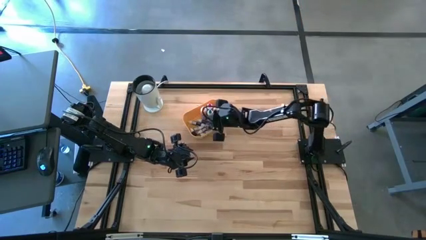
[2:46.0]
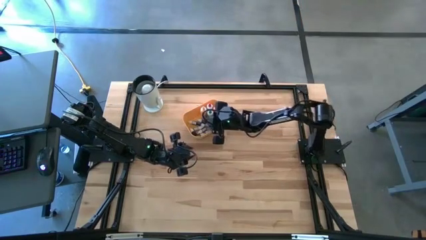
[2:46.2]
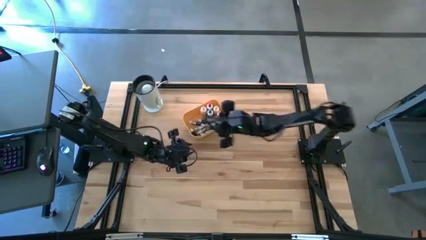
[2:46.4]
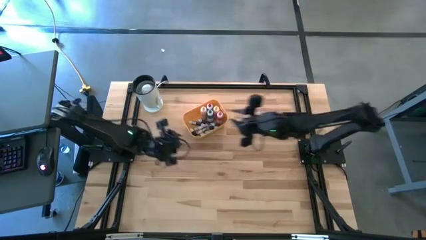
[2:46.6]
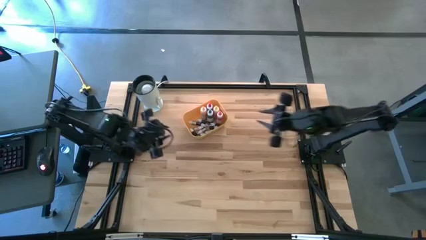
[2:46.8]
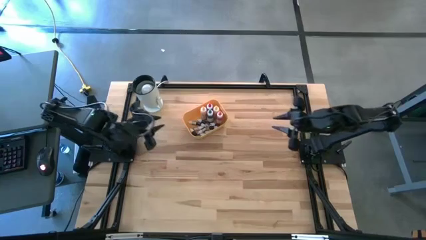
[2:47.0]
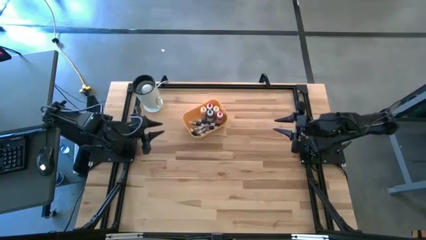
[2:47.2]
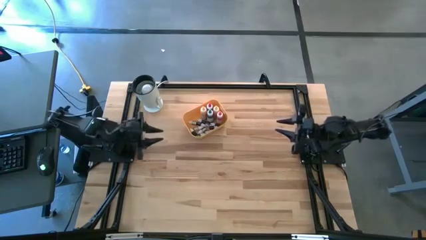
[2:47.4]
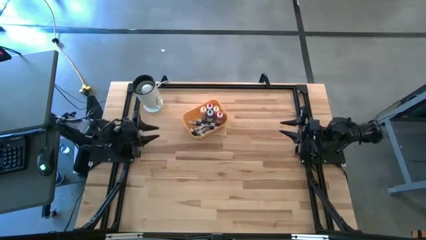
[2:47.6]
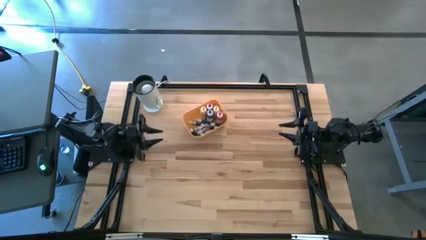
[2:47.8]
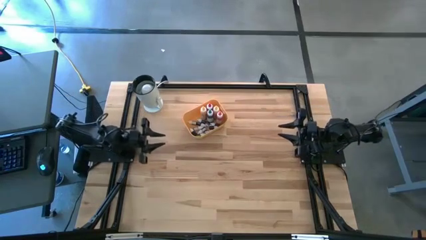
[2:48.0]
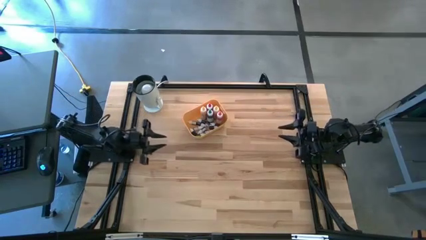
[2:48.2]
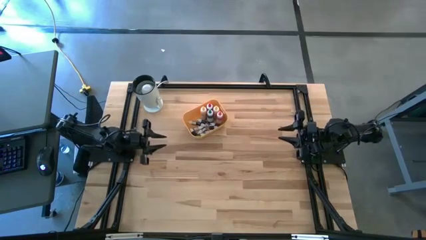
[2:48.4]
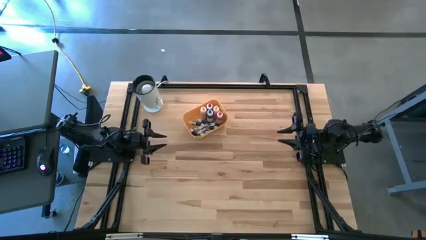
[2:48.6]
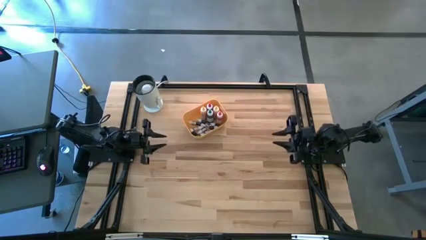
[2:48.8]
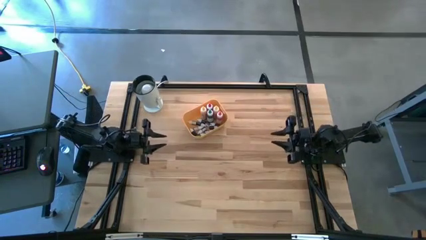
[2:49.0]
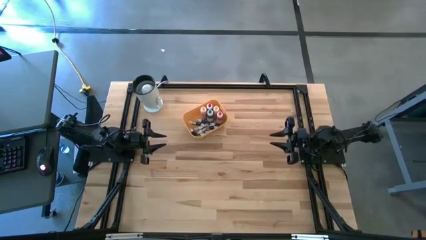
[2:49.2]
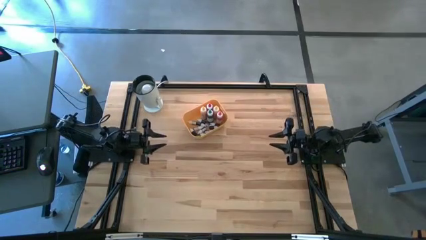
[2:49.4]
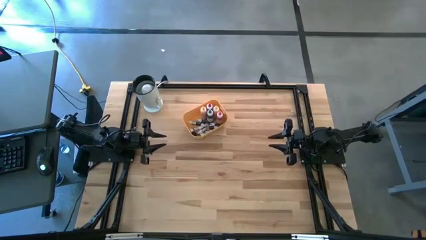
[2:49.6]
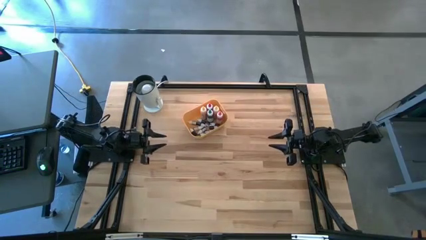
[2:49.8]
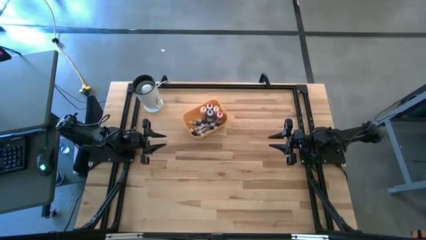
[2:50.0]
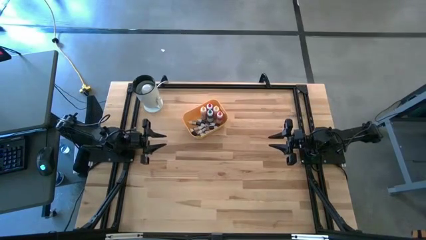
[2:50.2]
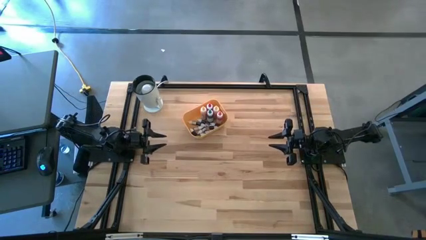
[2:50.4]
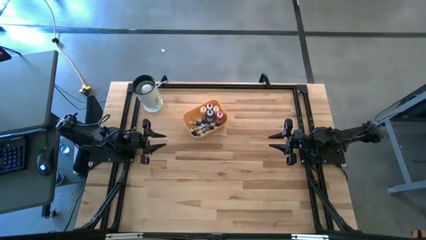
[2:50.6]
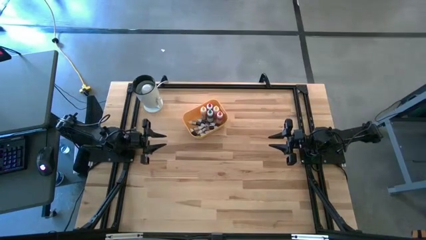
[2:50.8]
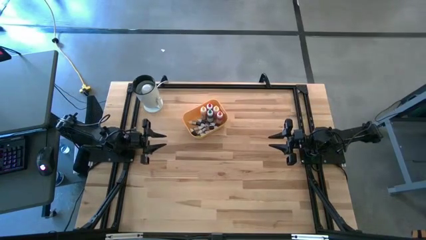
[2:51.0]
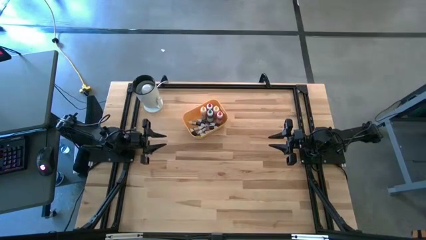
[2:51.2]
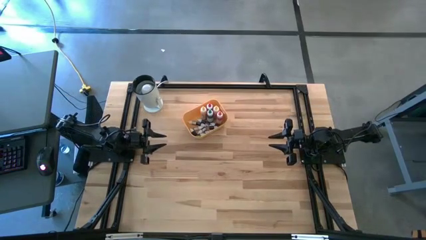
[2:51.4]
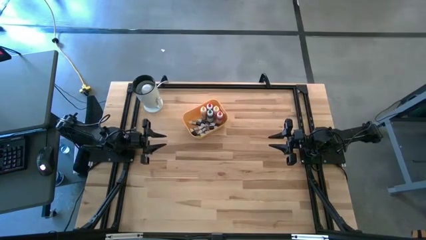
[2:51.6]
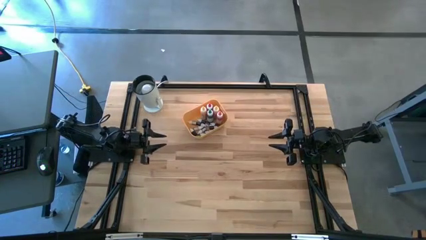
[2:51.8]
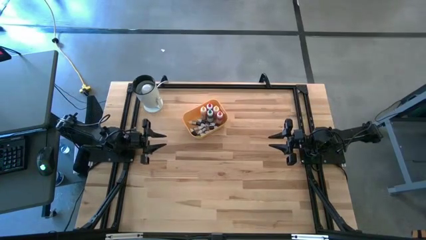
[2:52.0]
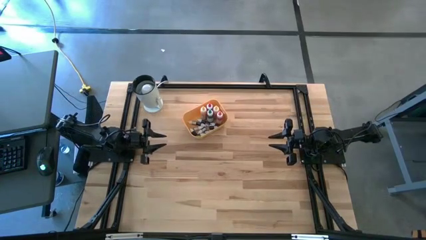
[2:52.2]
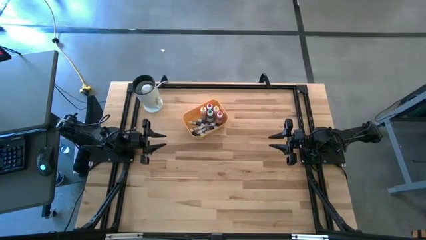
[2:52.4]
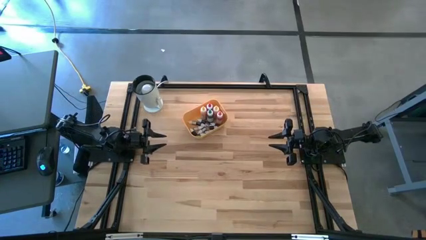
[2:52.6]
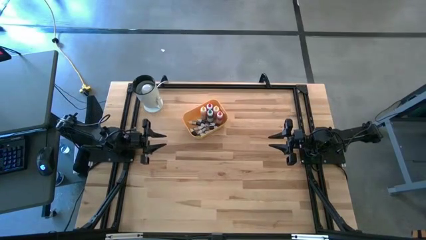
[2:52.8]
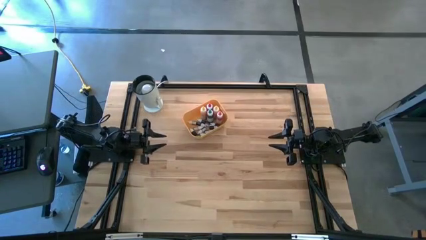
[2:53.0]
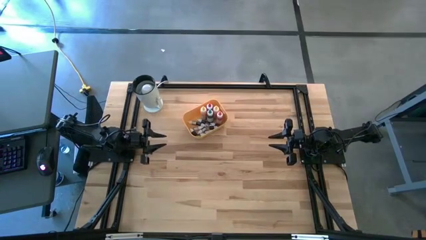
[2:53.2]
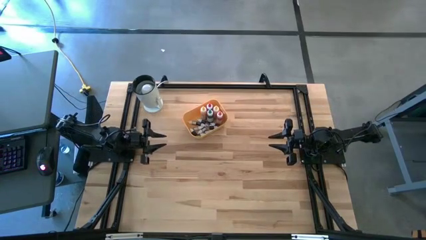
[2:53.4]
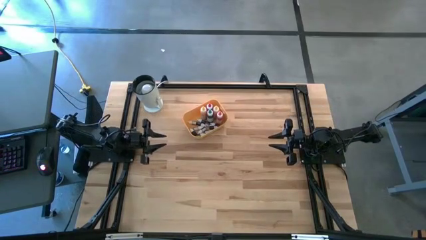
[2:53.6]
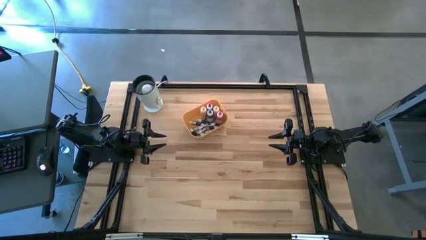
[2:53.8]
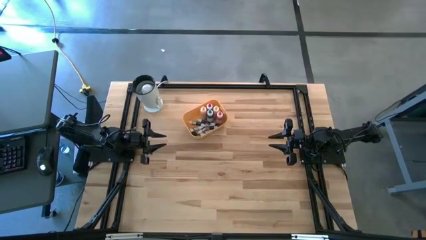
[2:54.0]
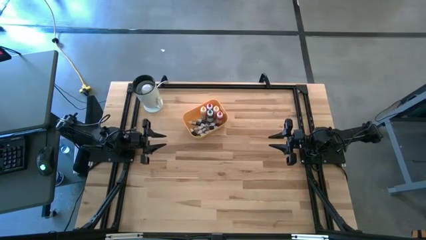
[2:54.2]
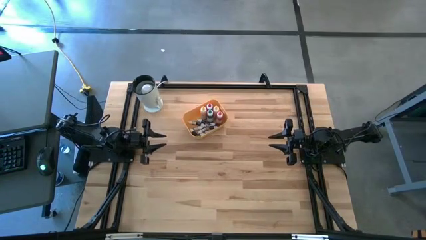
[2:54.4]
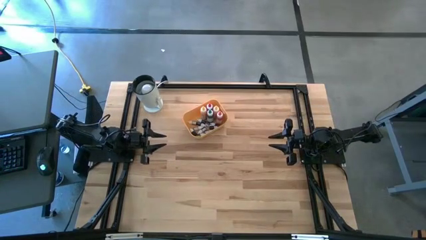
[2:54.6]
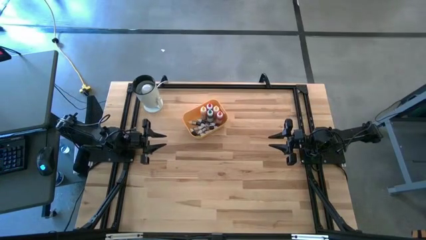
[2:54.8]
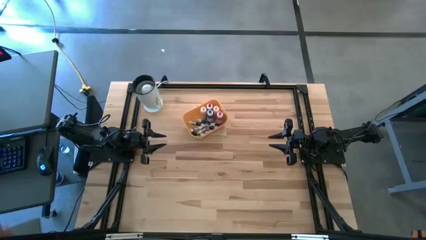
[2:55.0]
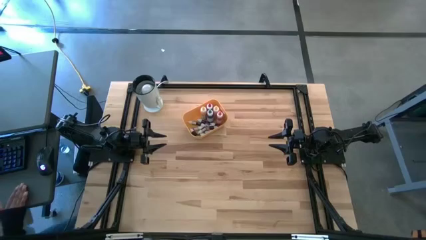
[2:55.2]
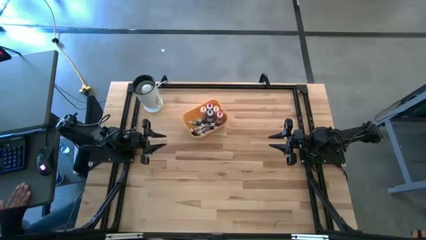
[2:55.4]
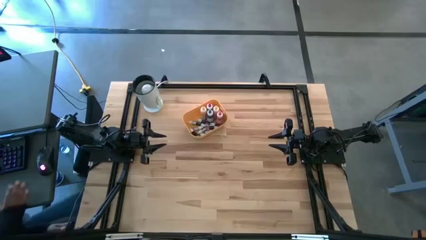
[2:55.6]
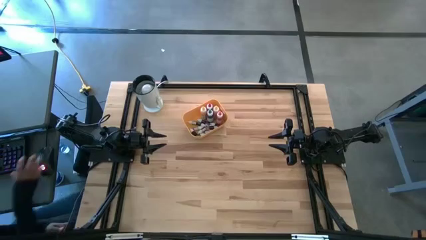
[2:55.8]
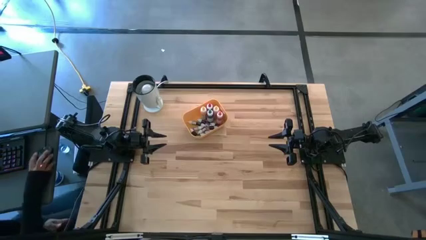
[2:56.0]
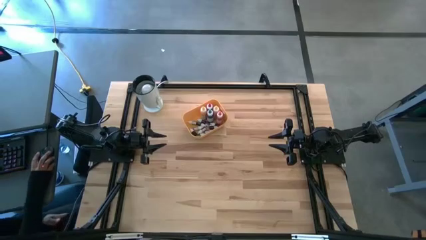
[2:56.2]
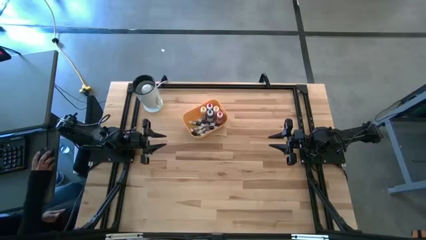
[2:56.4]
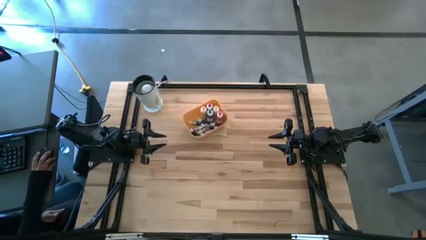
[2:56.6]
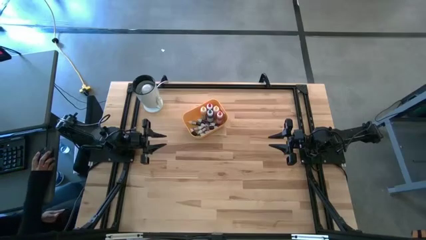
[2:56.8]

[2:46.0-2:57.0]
Task: Pick & Place food coloring
Return to Home Position

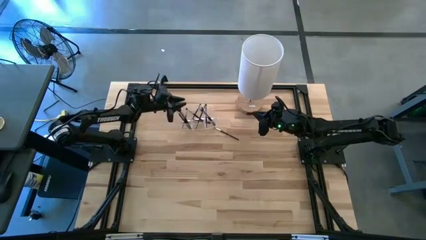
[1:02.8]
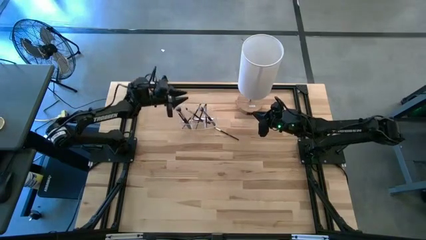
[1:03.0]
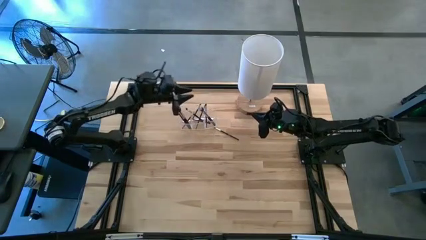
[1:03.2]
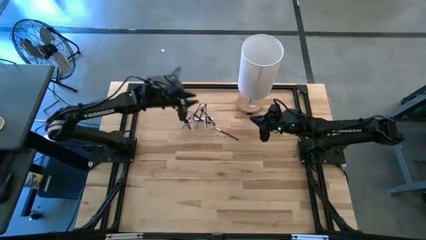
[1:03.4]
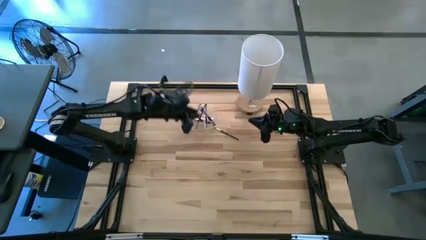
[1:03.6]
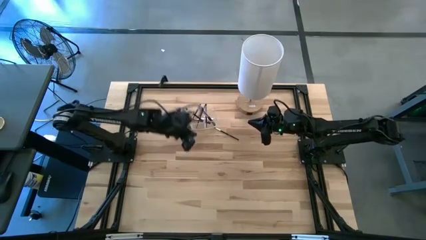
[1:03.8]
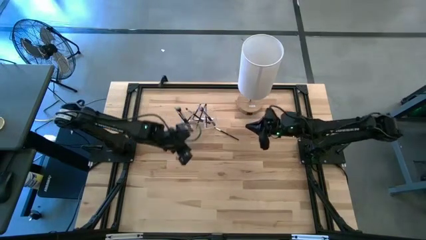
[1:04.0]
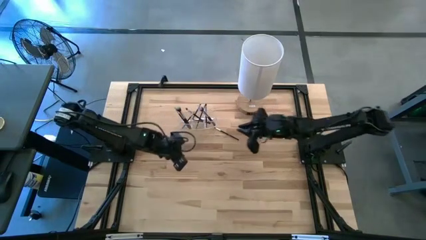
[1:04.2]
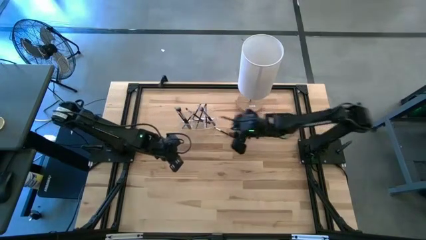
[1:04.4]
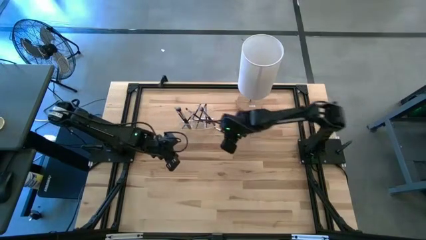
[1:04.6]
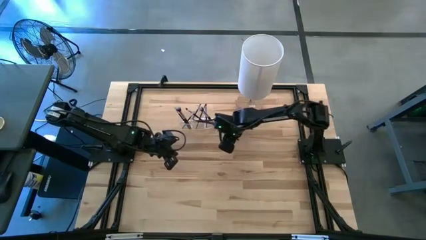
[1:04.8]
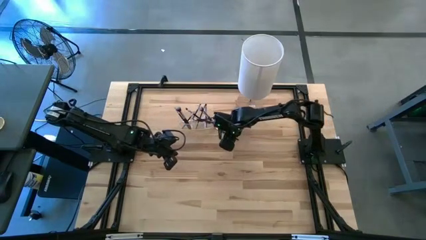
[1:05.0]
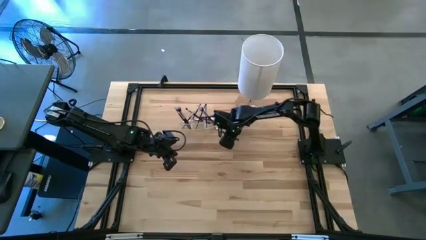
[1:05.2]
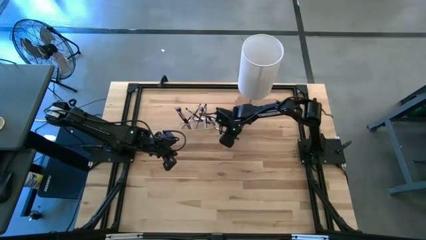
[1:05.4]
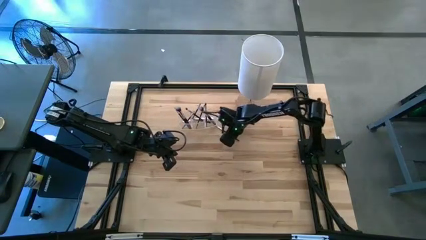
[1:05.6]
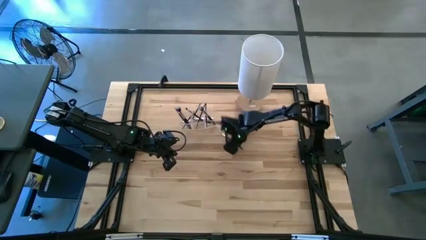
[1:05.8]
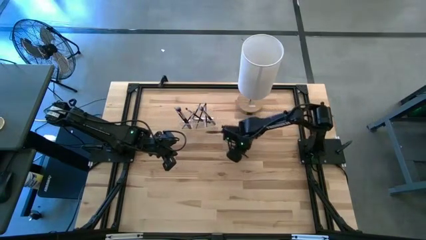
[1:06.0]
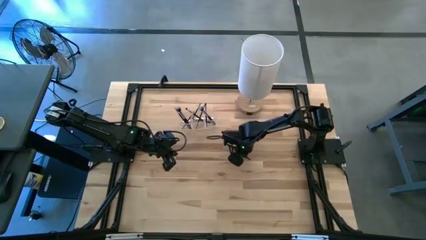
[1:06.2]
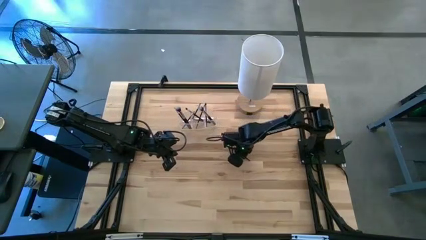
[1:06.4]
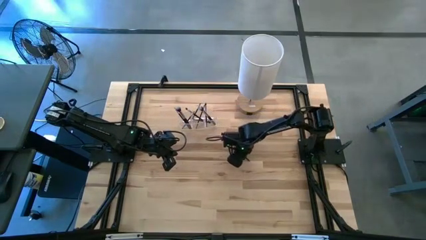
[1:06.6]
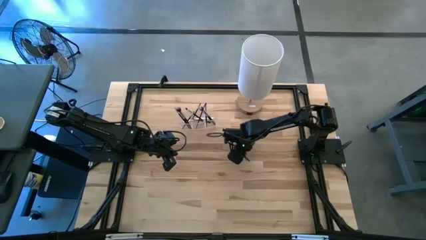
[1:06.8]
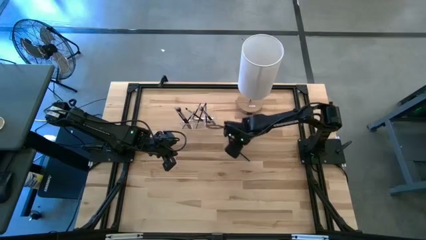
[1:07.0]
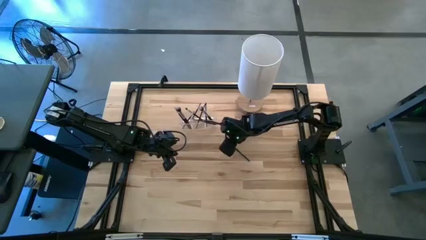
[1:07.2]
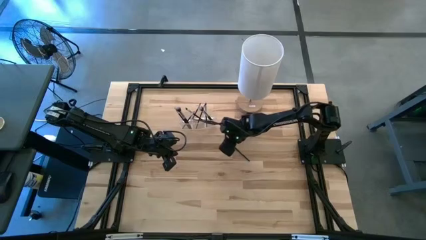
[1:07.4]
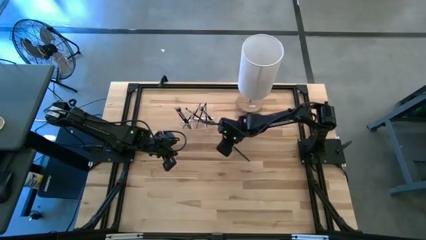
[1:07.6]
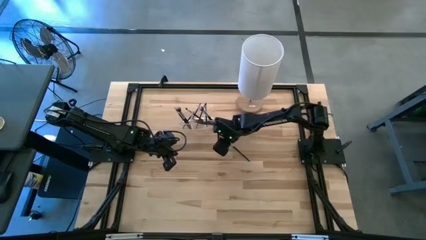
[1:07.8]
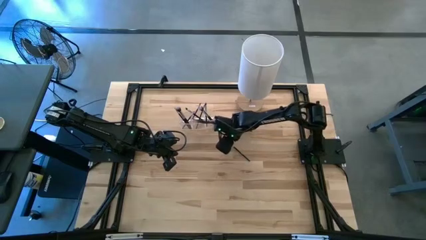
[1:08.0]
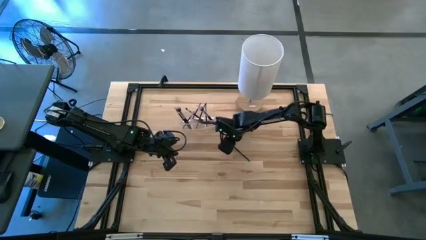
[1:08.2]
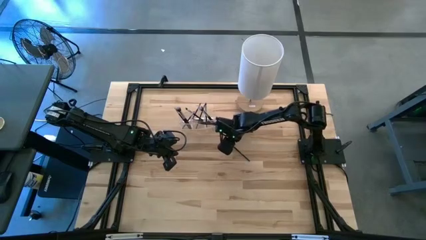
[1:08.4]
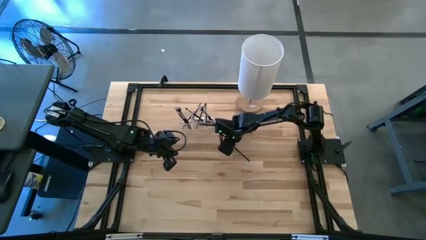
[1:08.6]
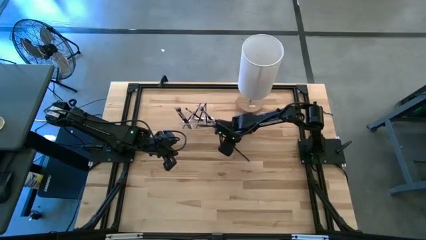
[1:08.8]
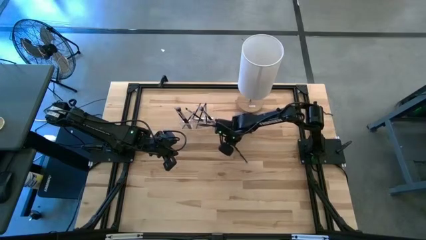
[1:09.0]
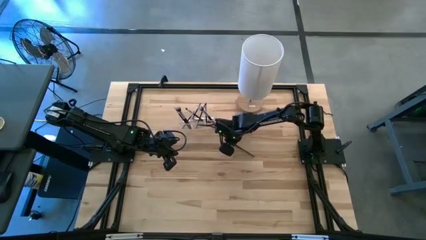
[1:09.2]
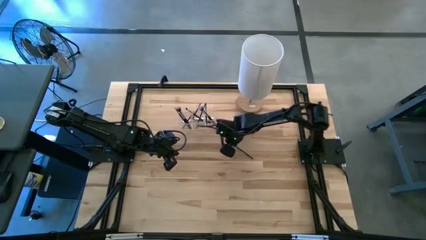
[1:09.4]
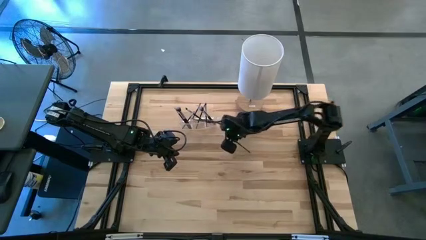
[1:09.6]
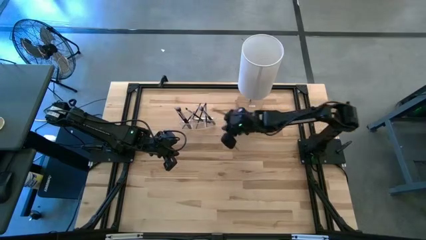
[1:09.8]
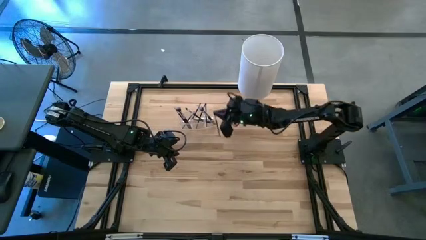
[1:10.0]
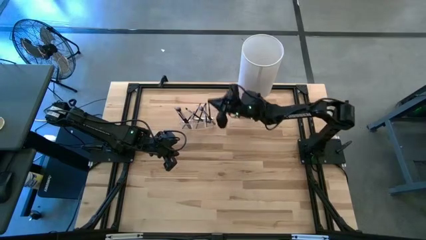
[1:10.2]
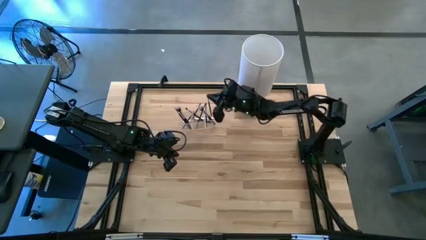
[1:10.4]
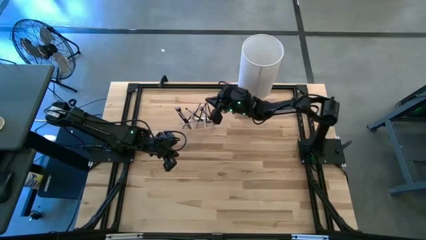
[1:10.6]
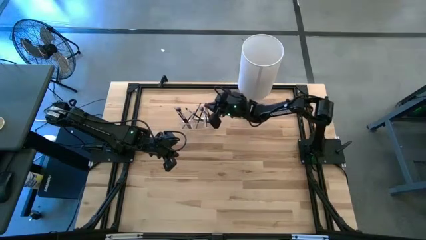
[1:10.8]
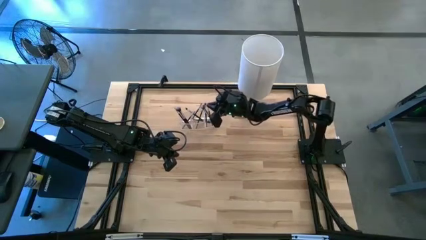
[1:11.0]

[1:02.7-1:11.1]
Task: Put items in baskets/containers
Put the black eyeshadow brush into the transparent organizer
